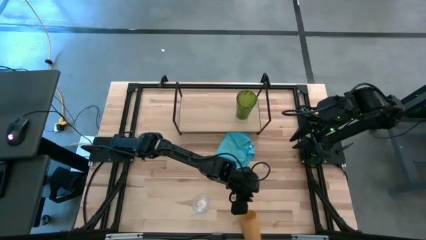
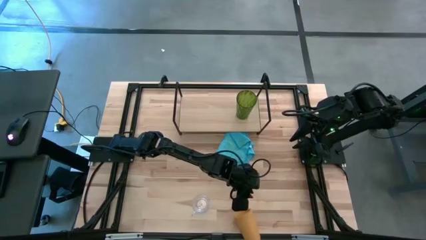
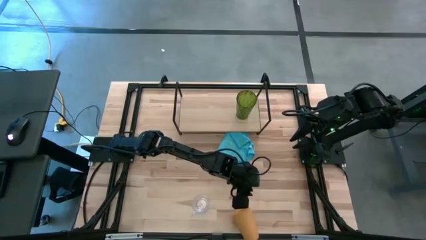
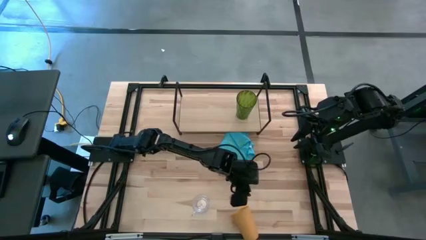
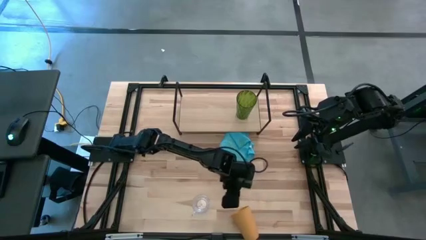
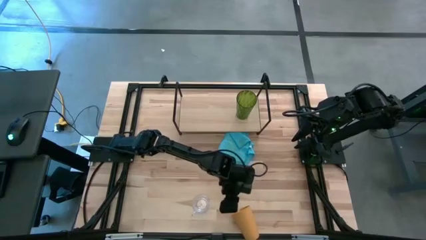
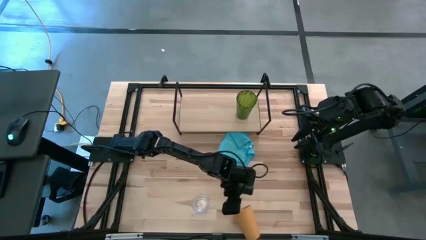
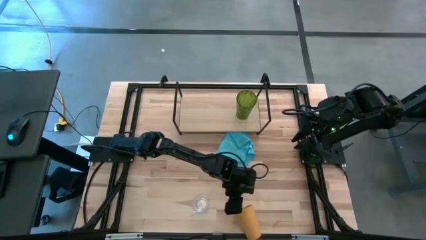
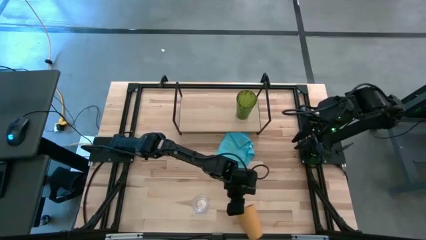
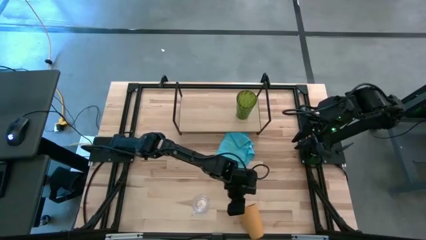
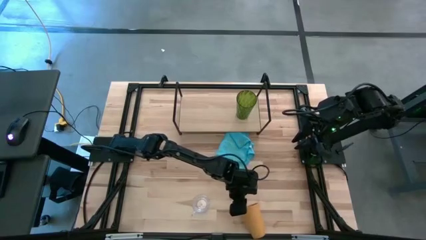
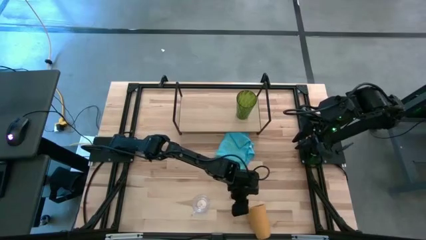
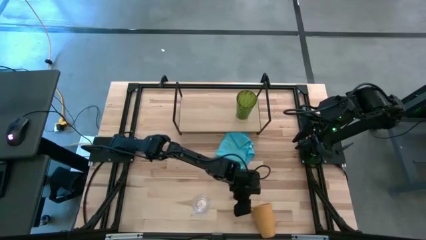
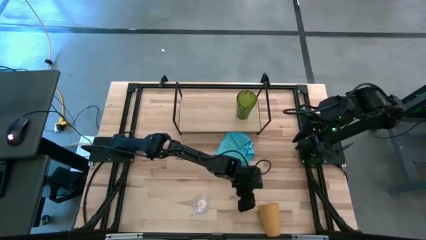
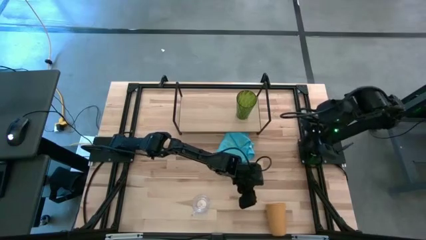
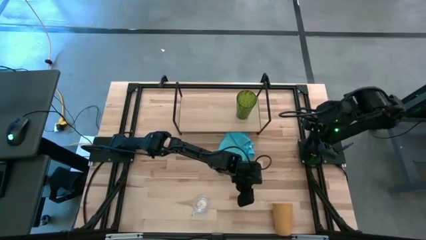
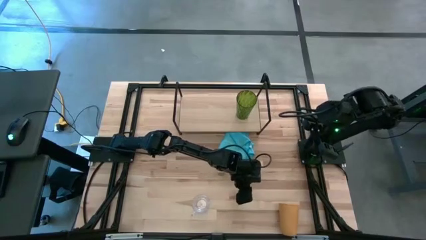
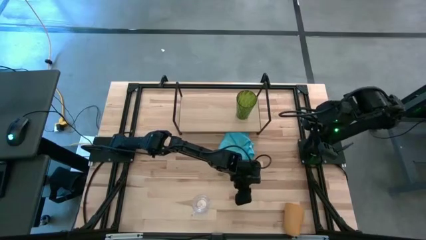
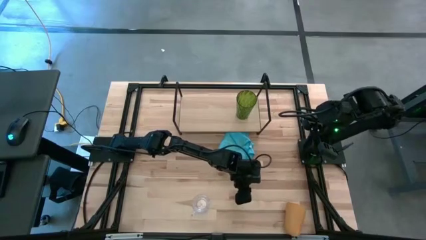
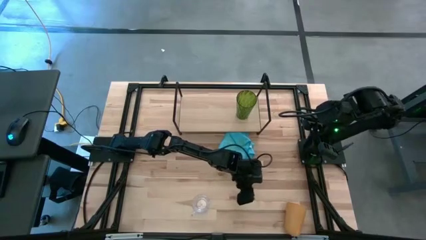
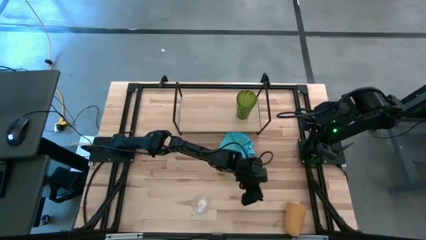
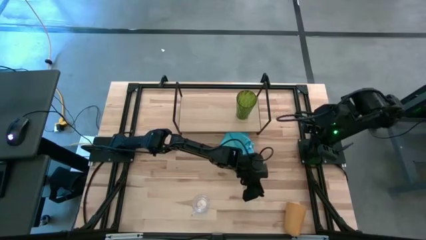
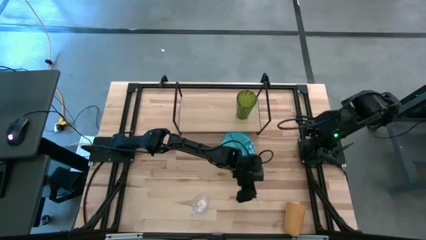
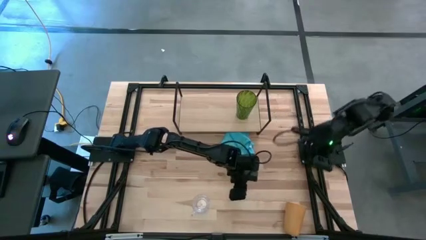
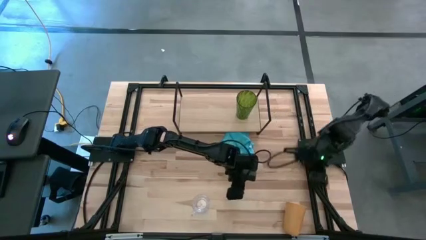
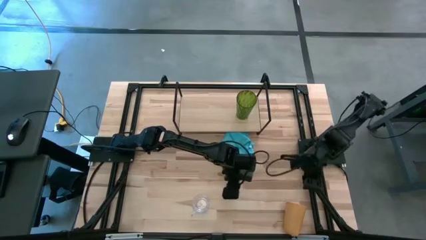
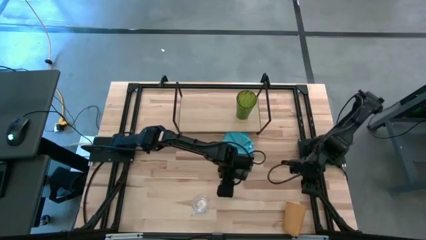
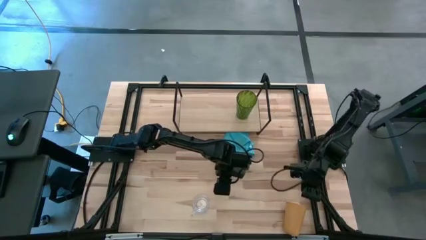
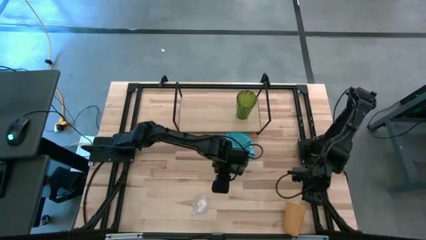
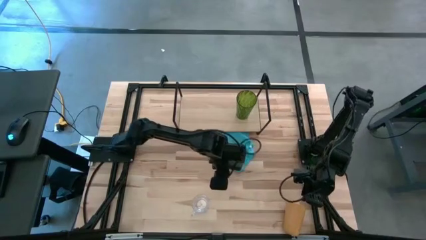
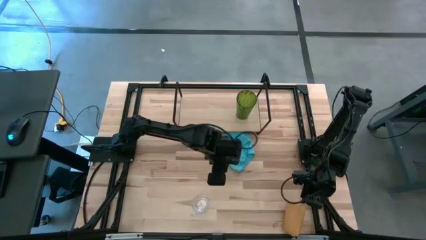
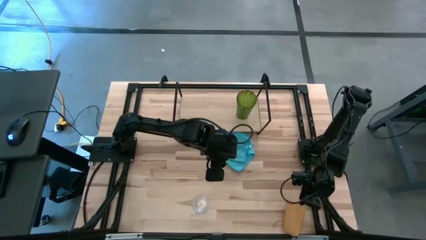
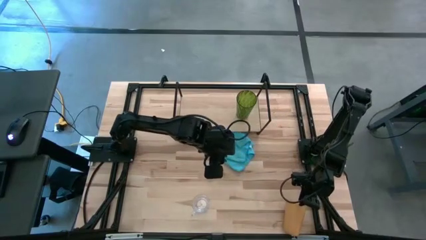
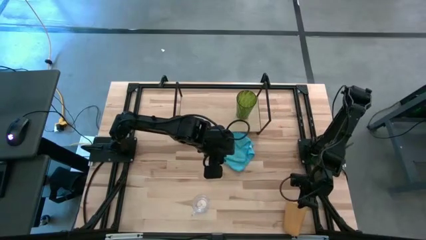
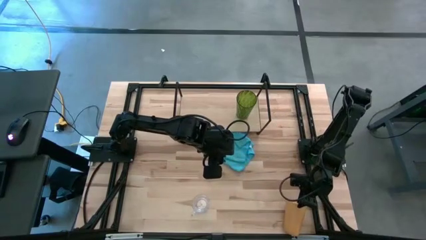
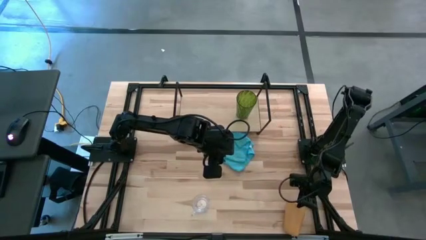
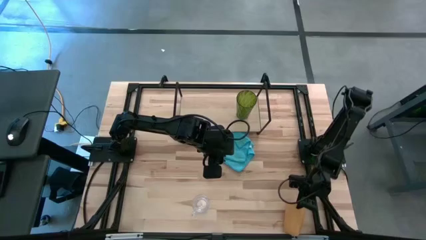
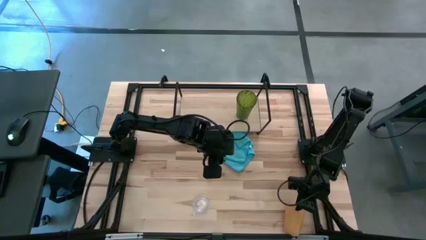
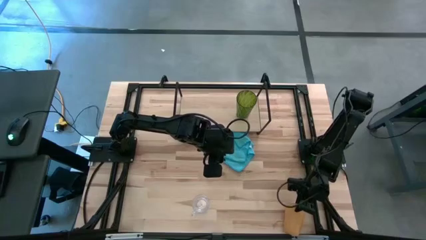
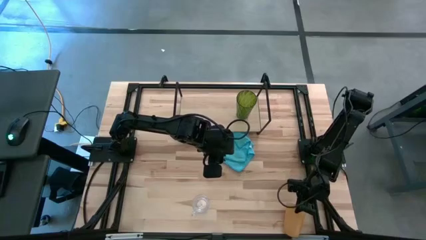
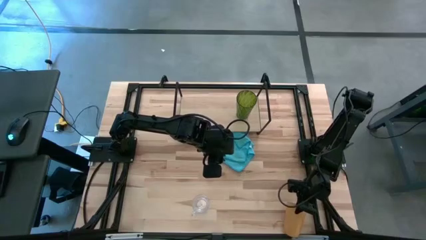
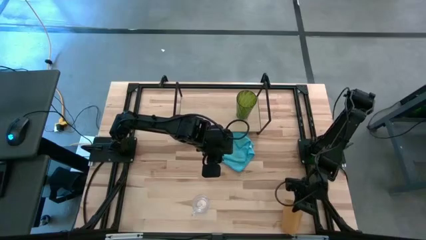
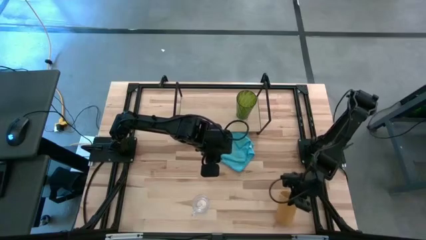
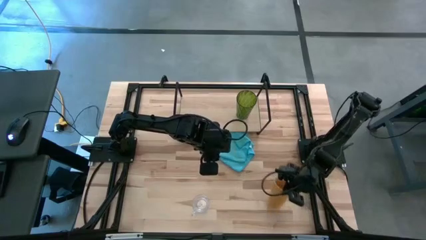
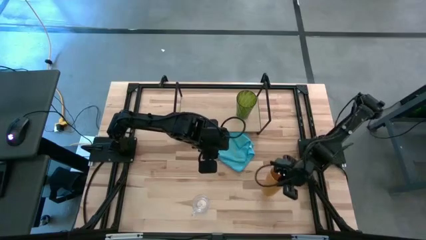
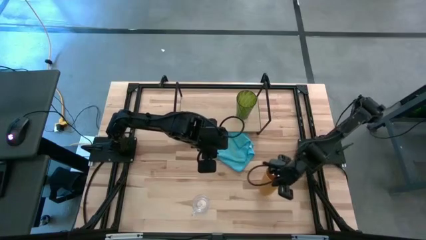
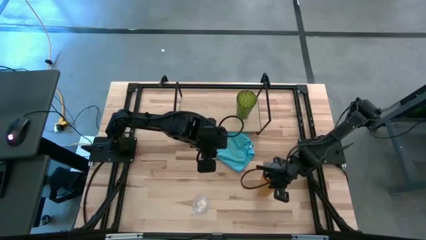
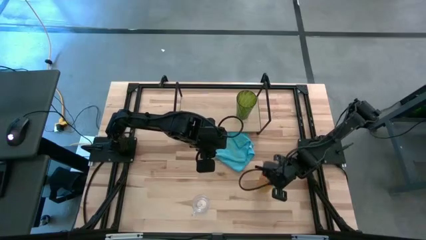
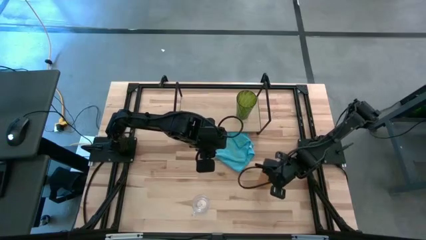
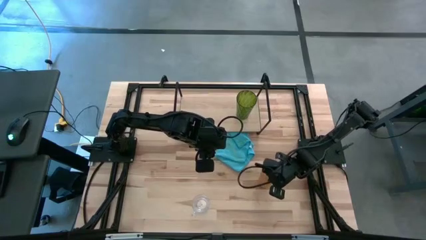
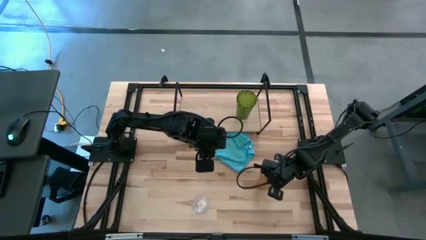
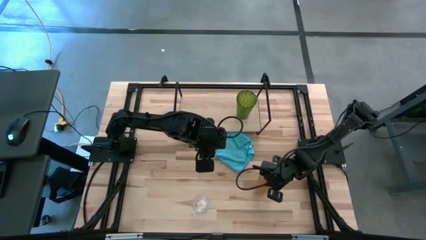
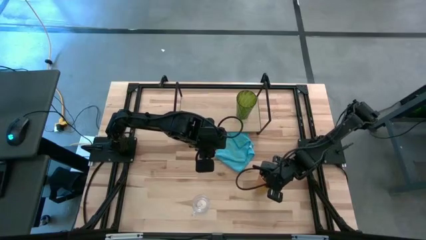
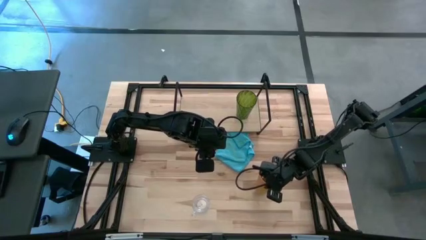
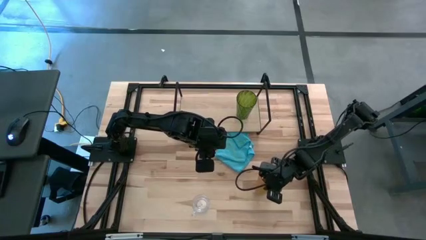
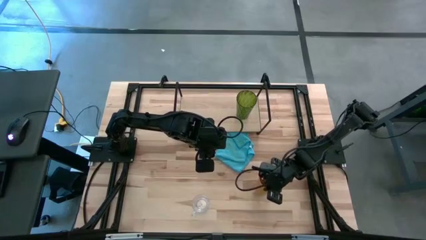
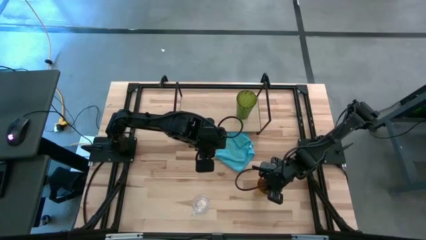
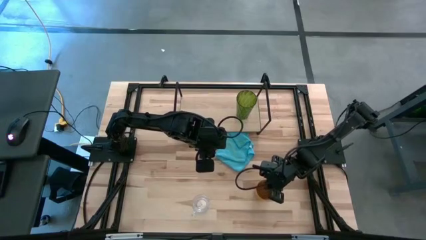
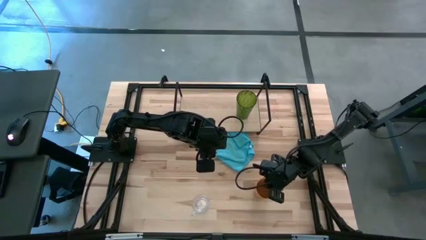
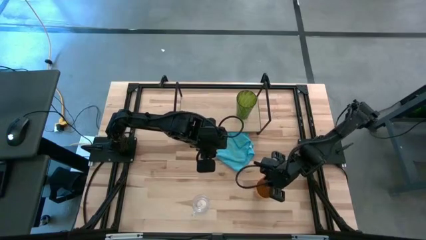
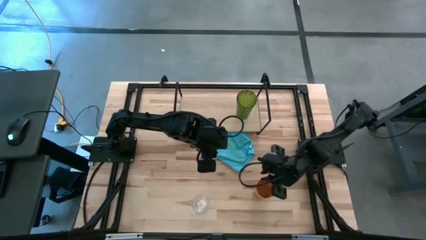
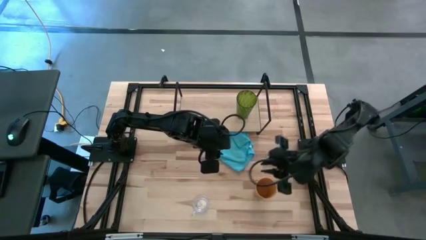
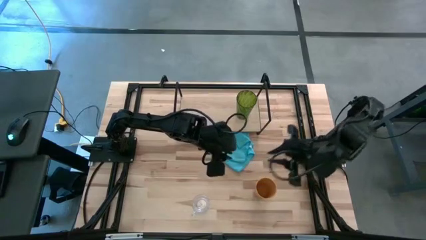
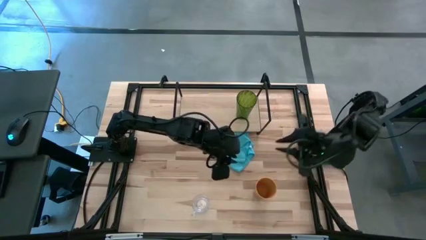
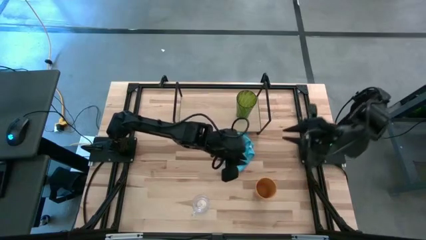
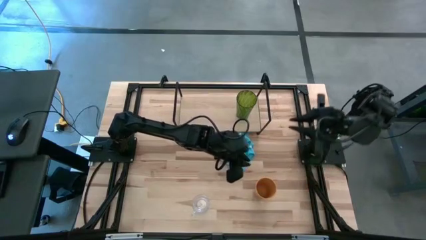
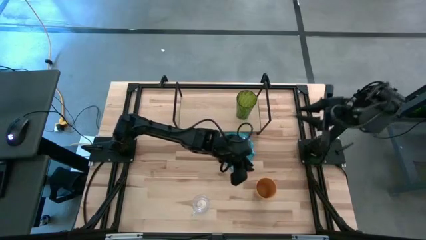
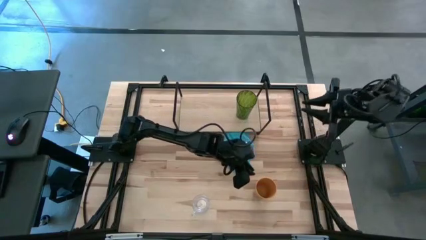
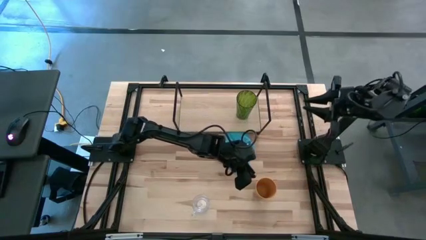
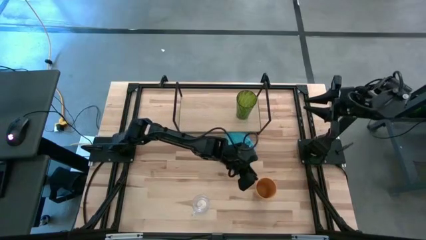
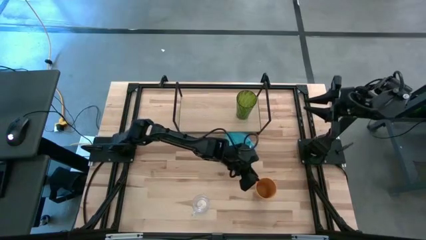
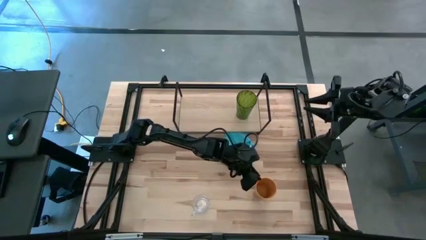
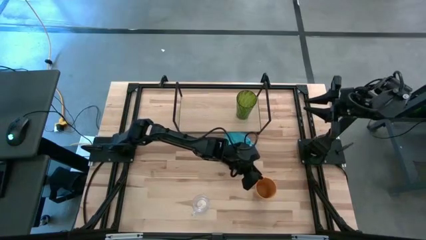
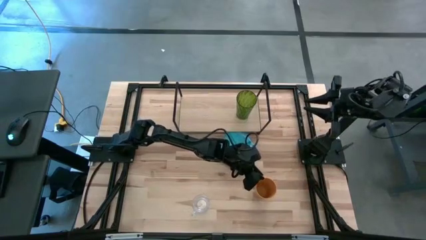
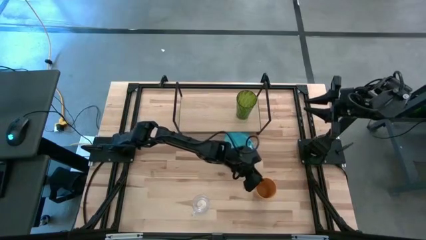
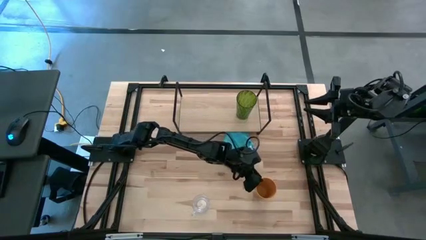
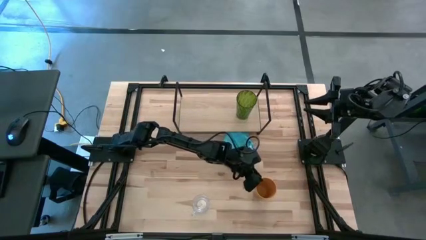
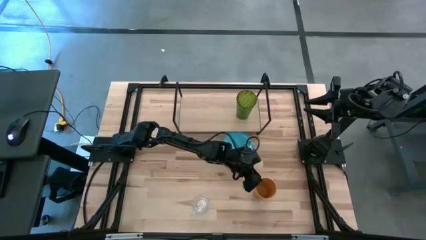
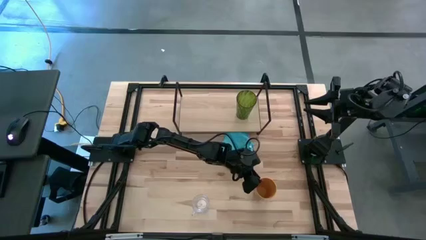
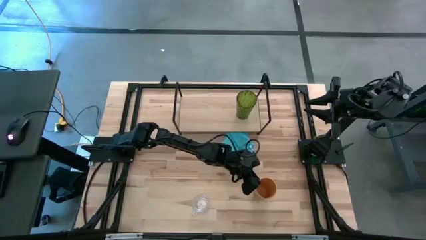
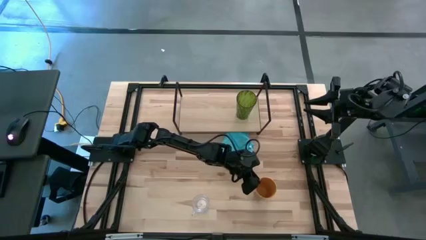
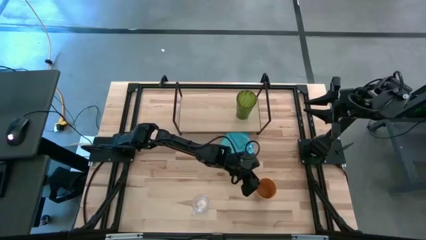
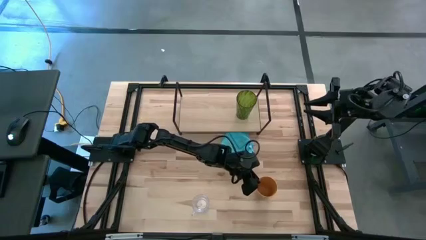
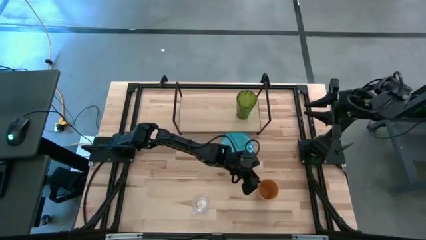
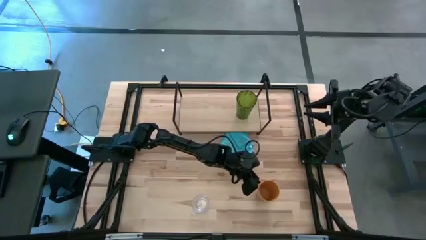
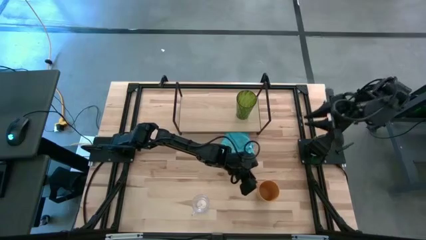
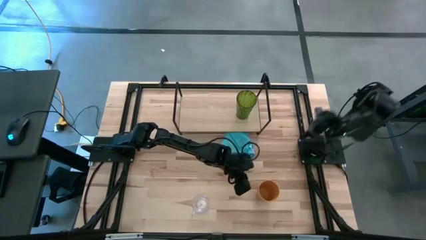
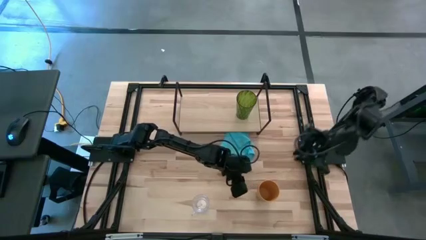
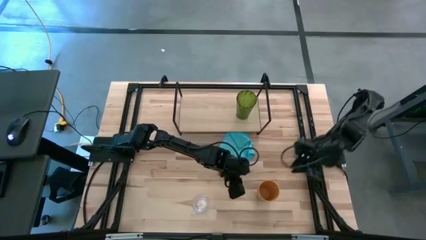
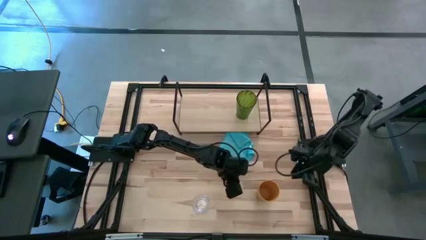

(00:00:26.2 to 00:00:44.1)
Task: Stack small to large cups/mugs on shelf
Put the yellow cup on the shelf
